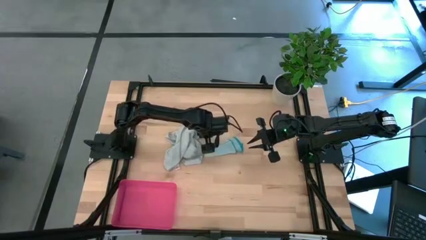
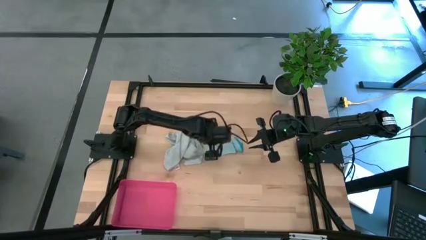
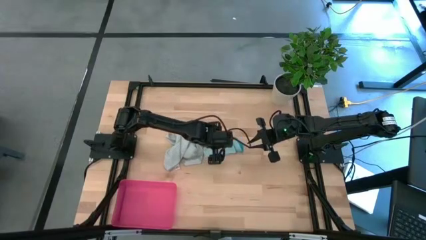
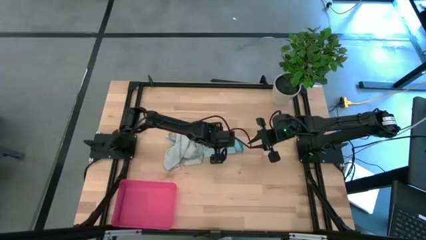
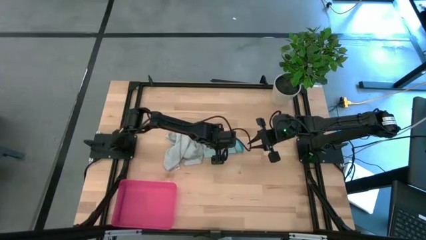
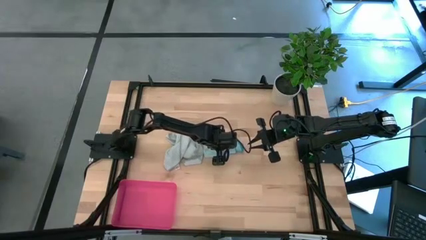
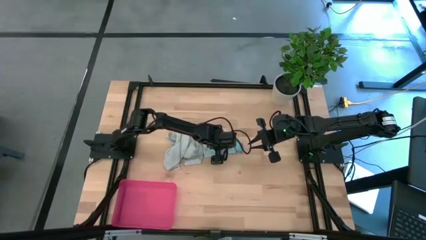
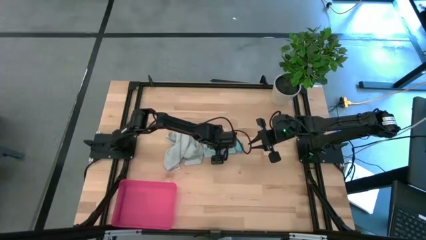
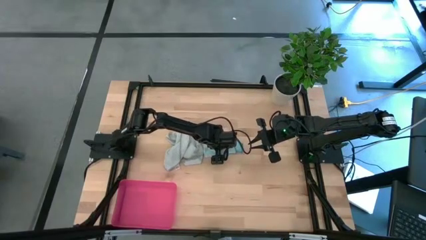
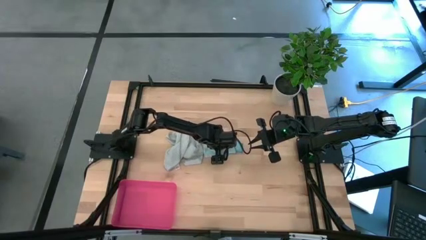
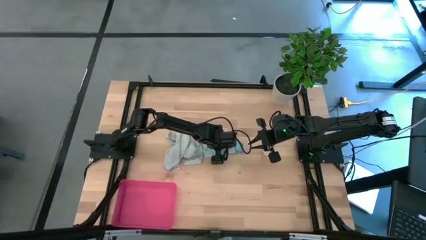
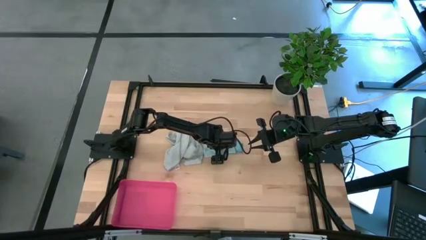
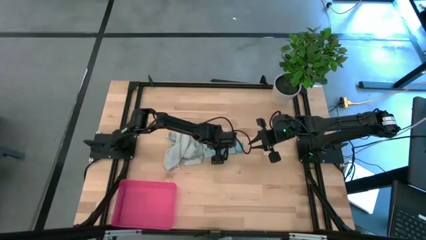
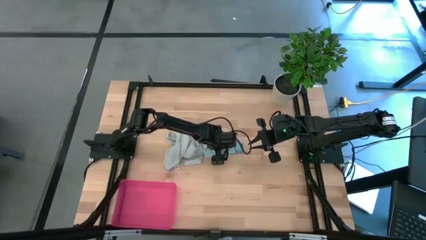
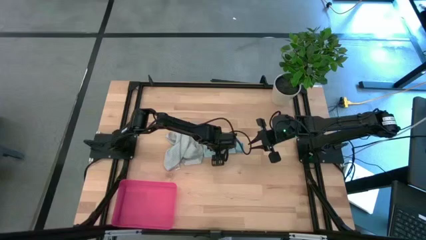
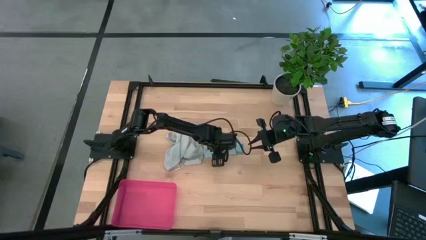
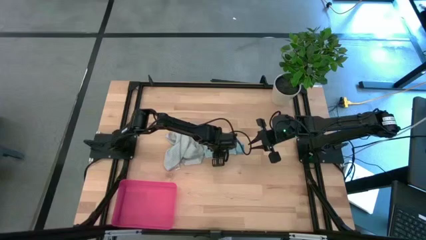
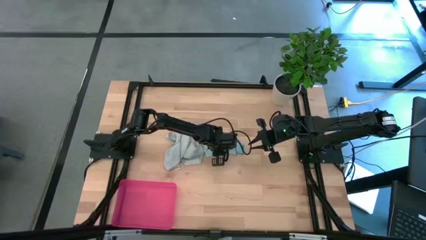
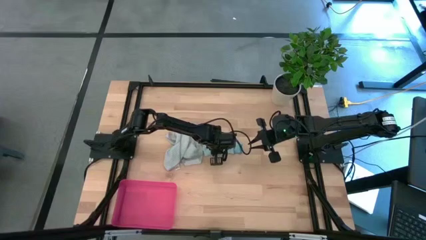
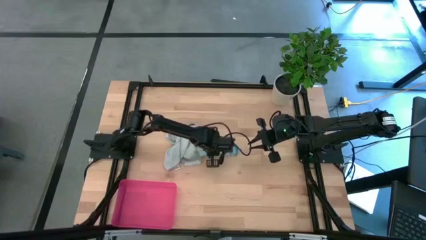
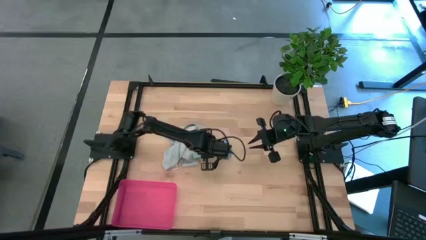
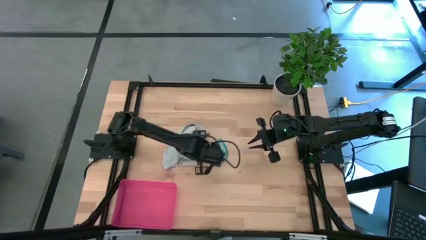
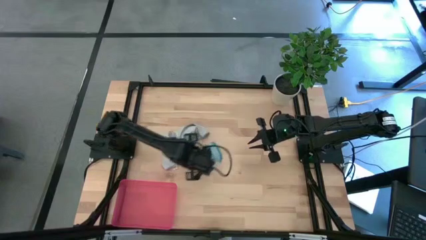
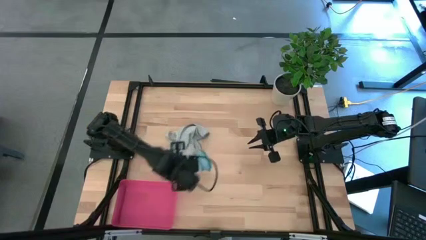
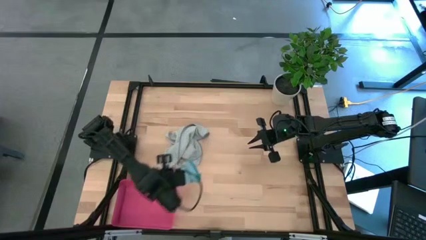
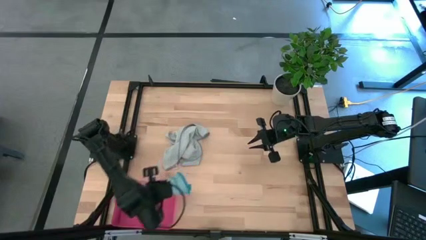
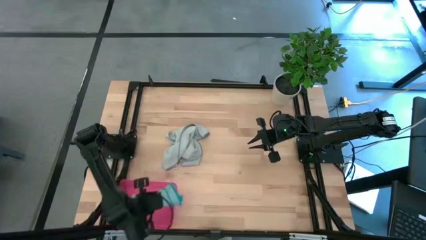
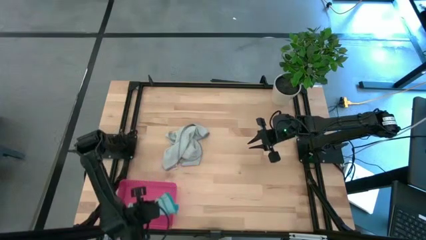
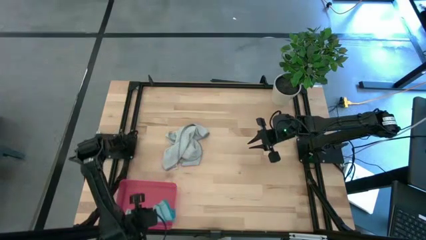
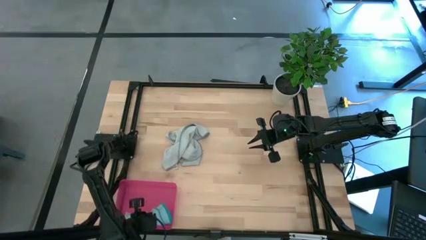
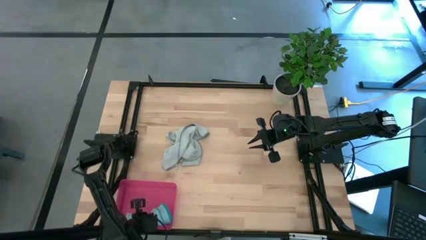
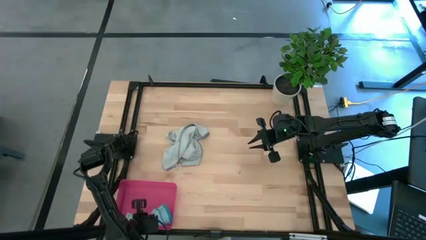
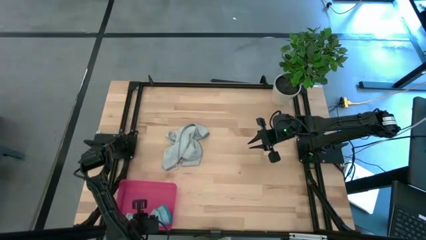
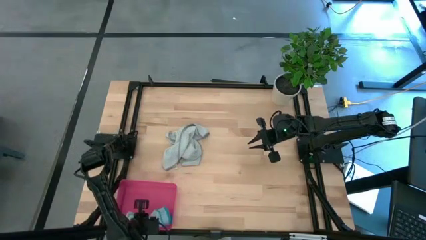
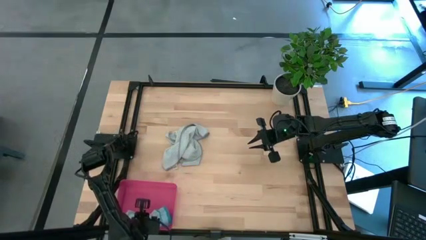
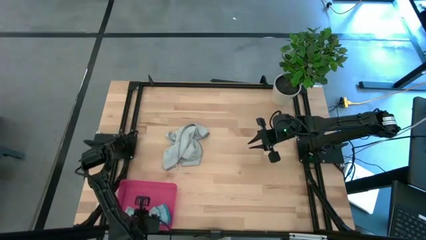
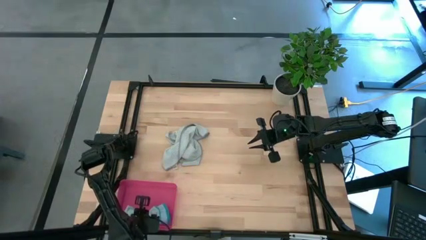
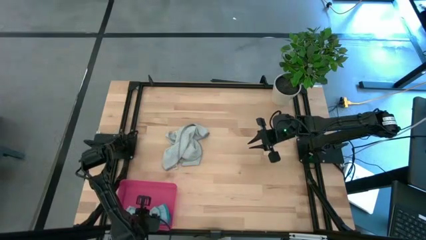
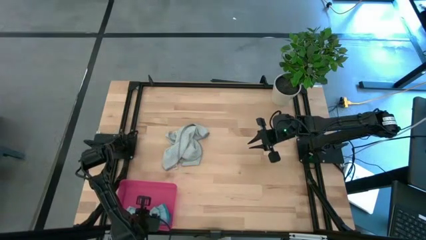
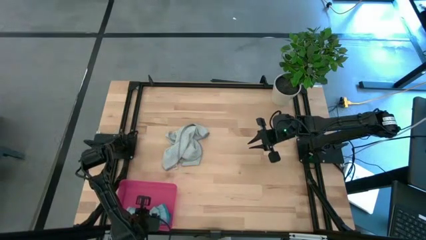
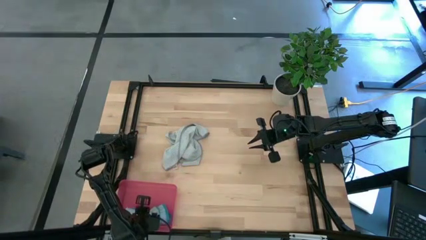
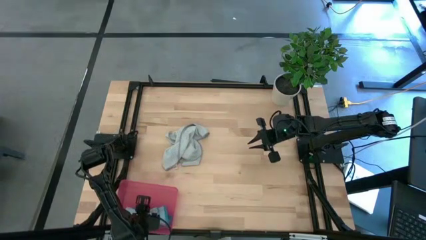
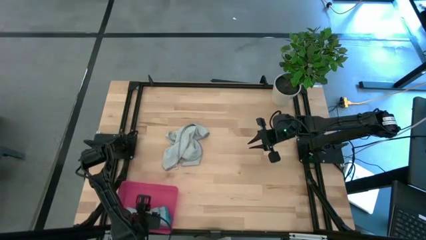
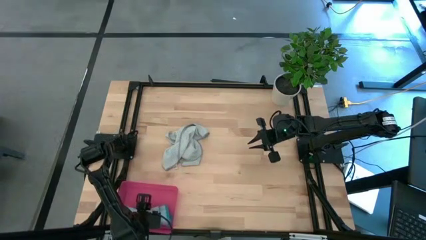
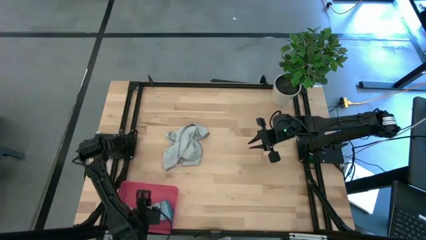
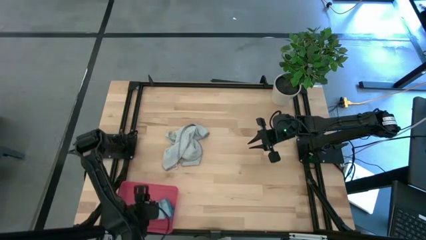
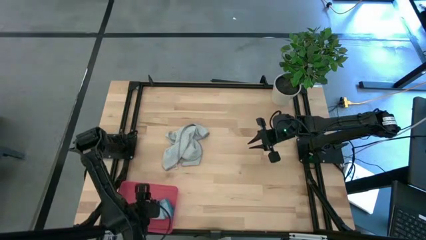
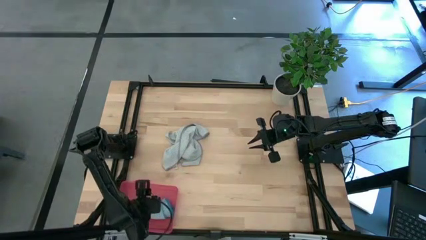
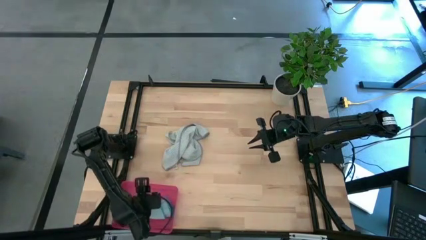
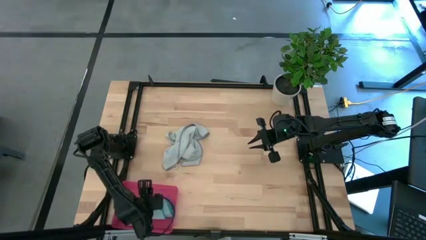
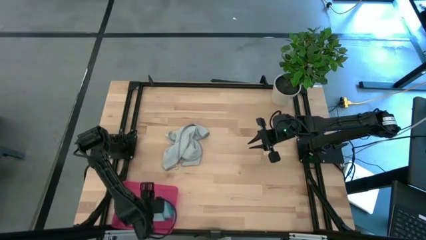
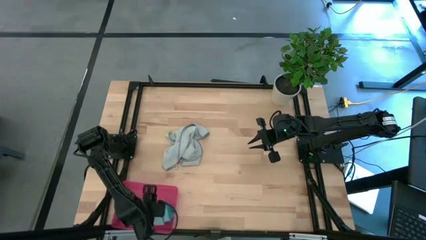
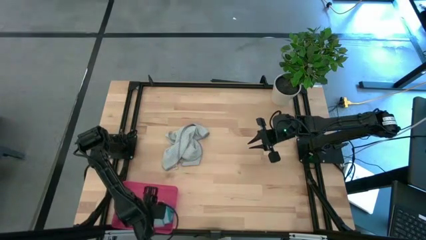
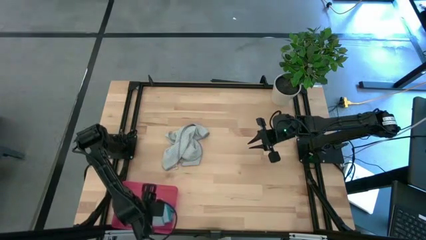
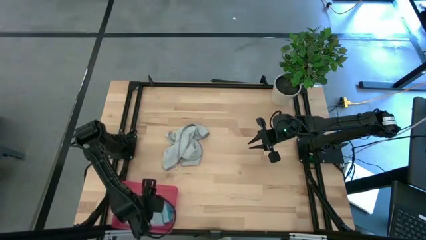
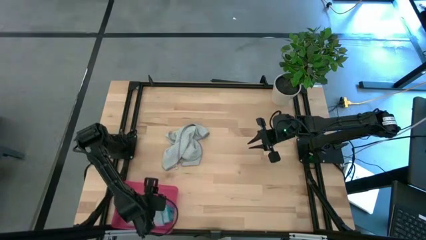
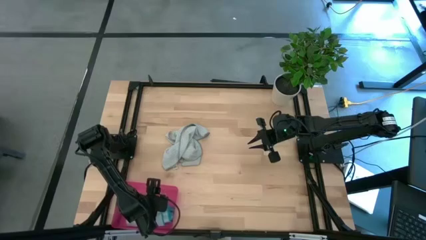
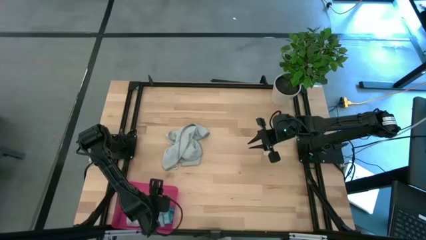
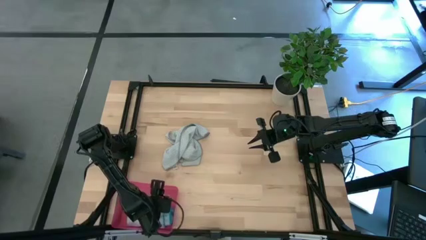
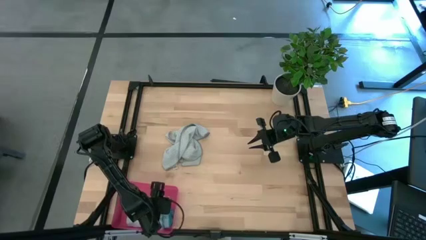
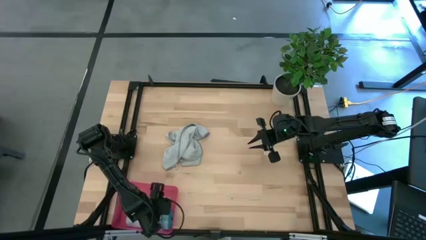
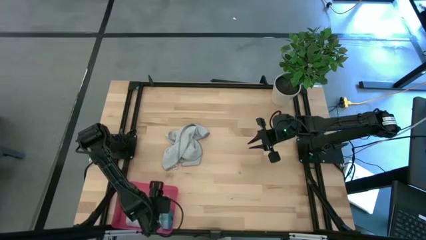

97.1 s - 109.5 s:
Task: Roll microfiber towels into tight, uniform cylinder then place into a basket
Put the rolled blue towel into the red bin

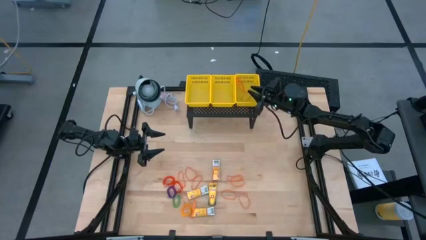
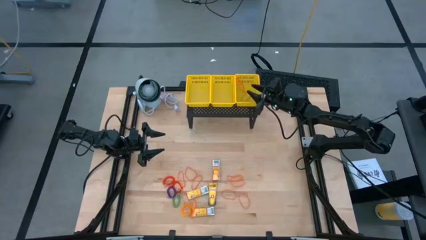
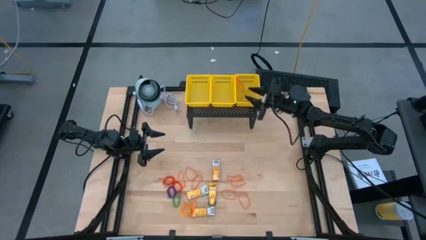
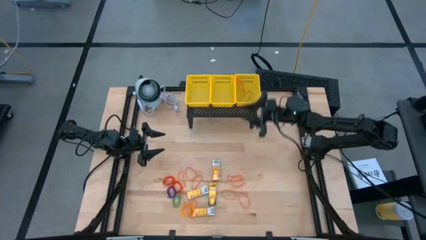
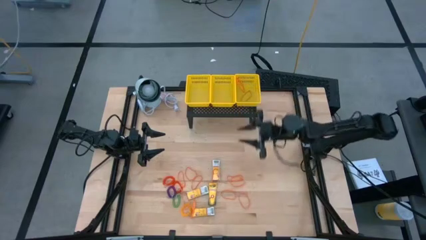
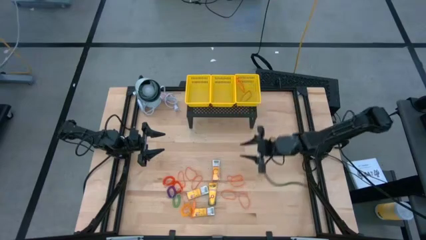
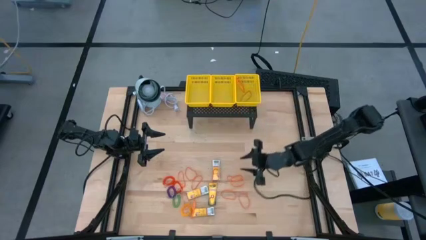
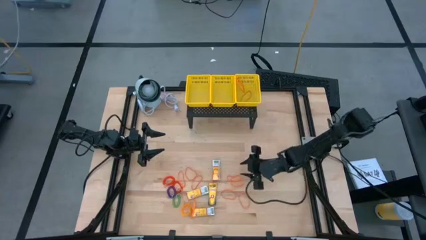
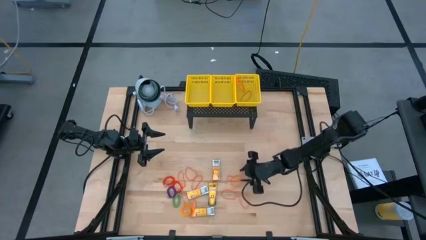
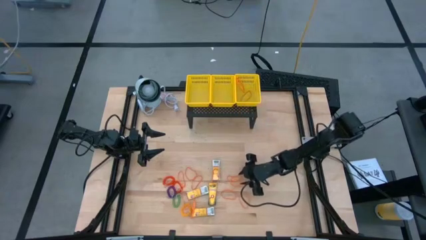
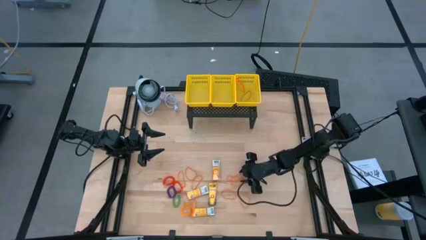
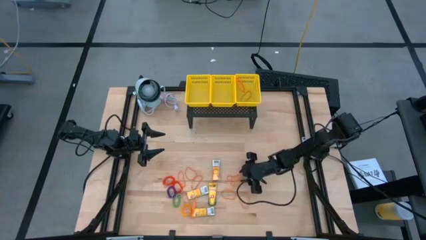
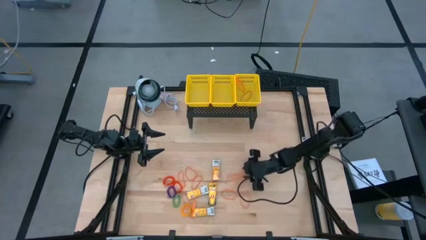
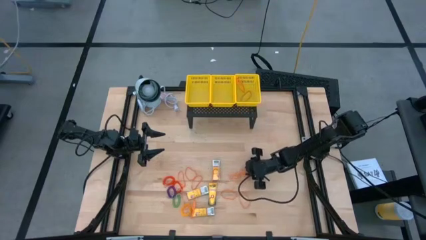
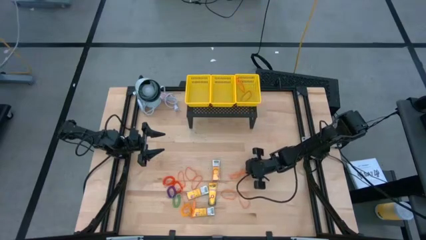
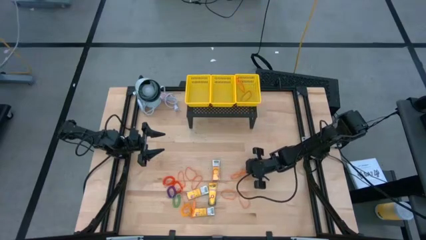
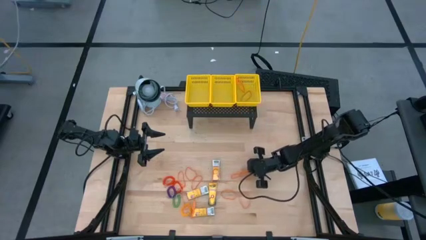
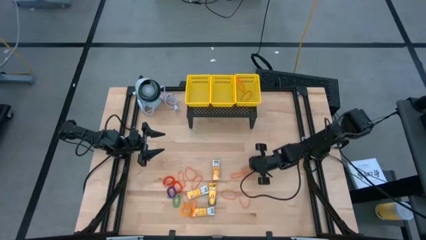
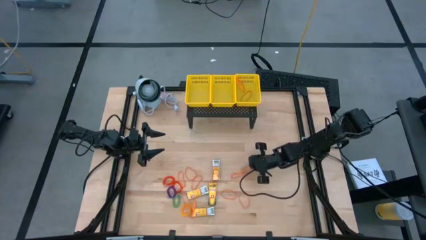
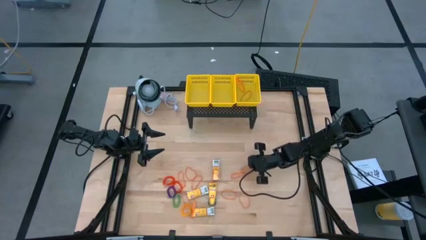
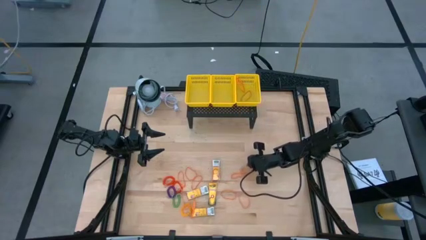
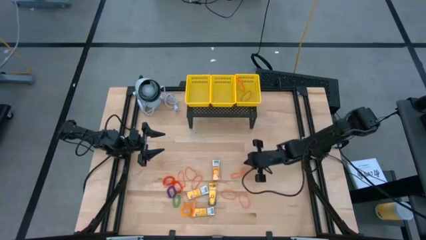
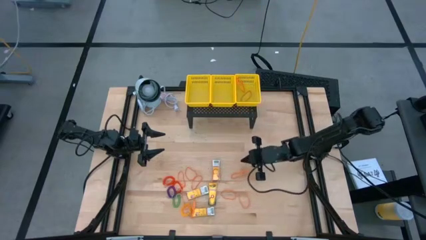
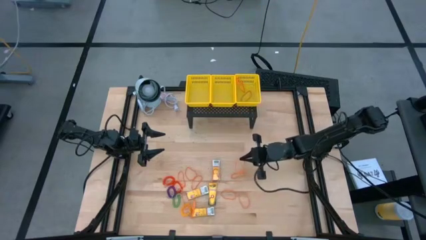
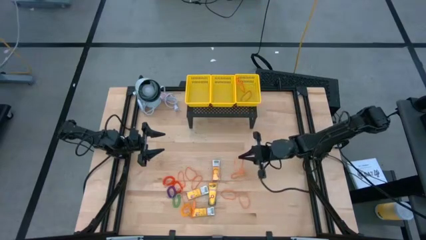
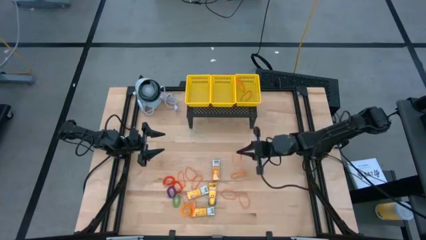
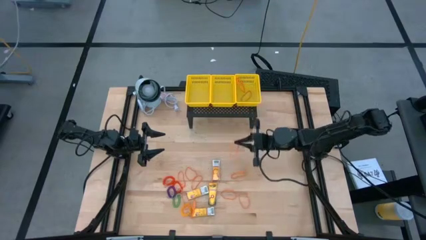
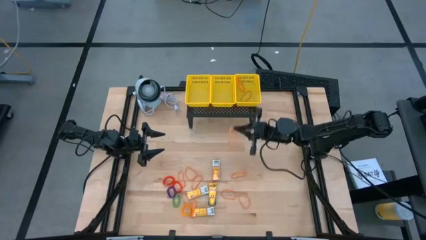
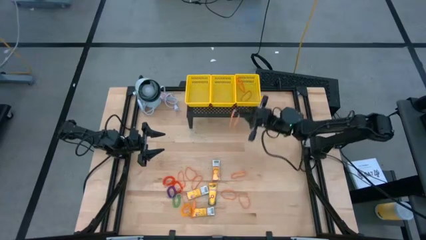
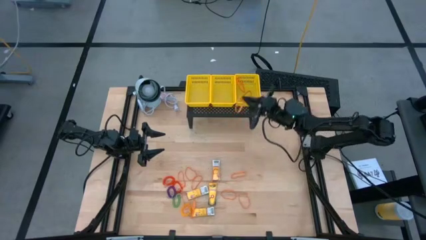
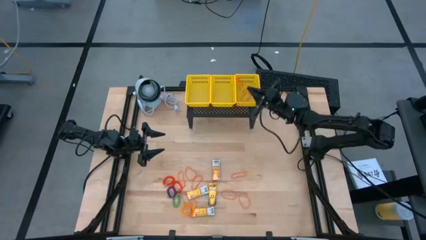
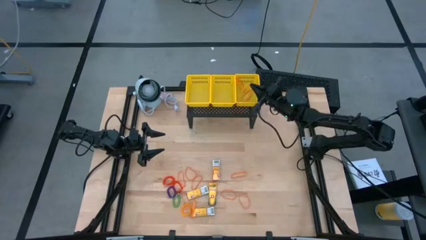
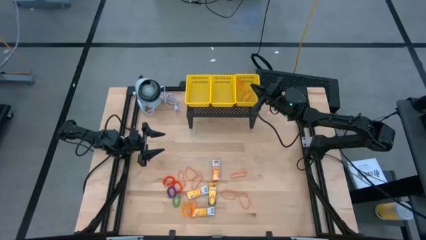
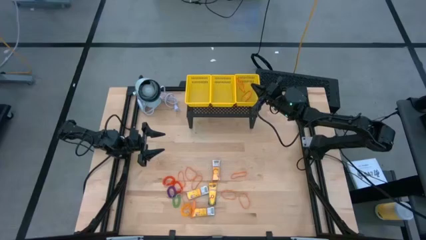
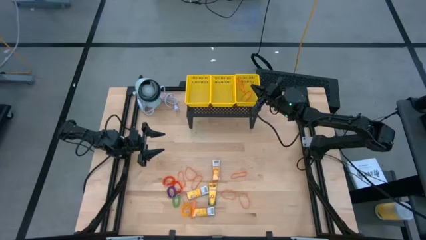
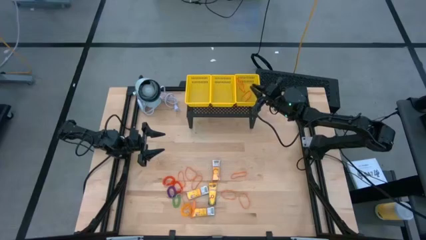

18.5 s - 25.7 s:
Task: Pick & Place Office Desk Supplies
Put the orange rubber band into the right yellow bin on the shelf
